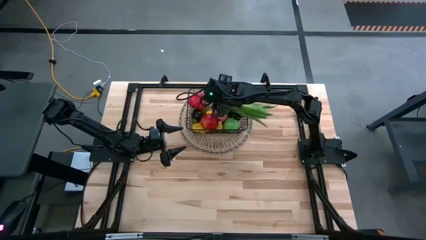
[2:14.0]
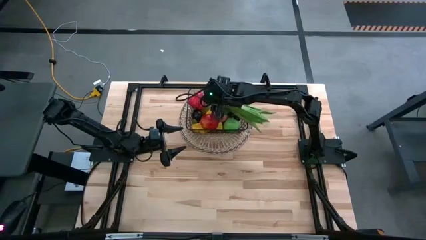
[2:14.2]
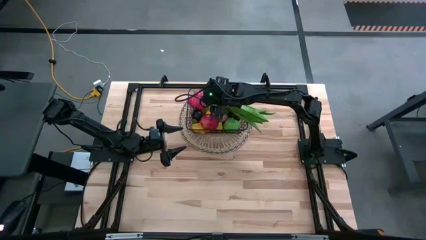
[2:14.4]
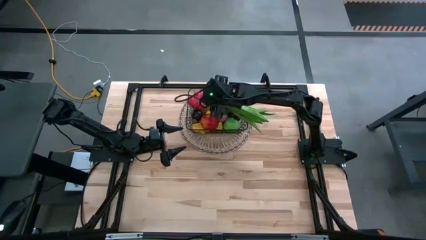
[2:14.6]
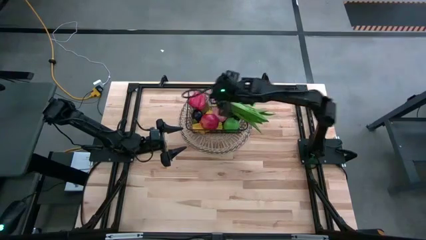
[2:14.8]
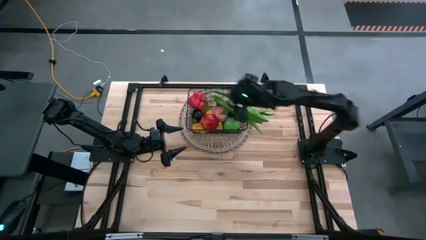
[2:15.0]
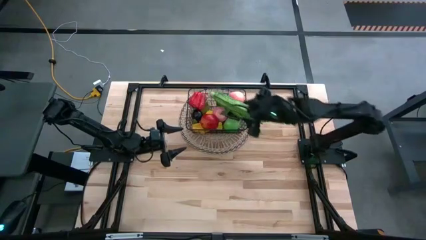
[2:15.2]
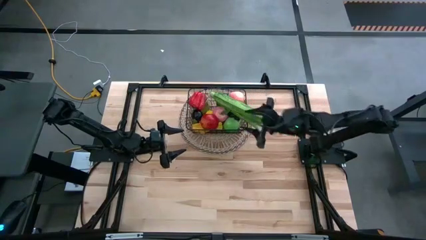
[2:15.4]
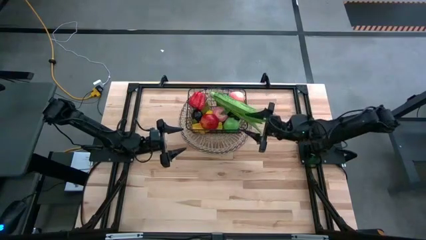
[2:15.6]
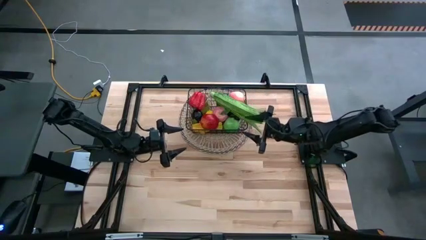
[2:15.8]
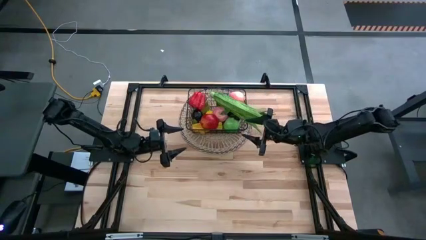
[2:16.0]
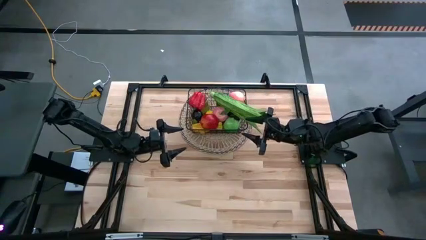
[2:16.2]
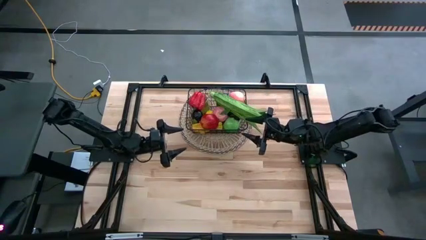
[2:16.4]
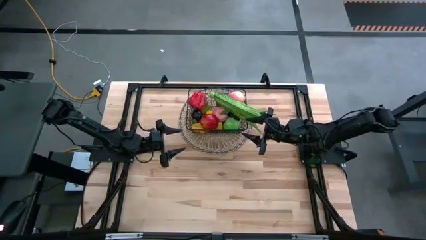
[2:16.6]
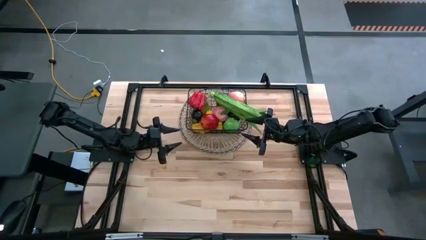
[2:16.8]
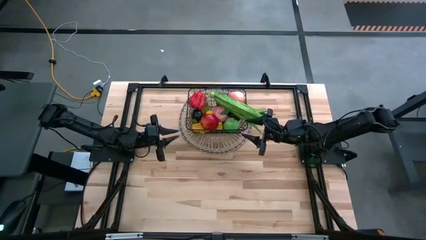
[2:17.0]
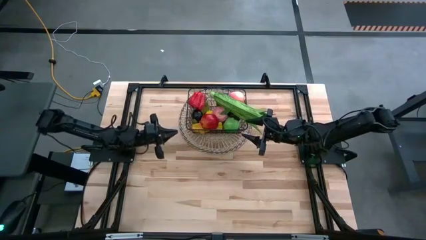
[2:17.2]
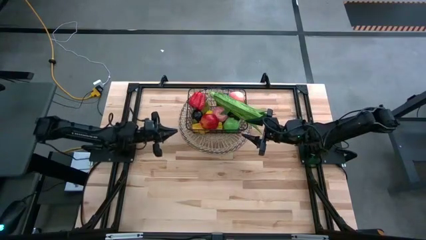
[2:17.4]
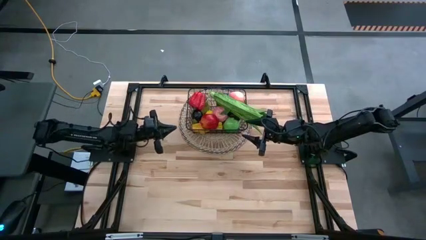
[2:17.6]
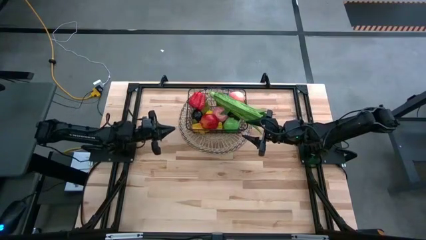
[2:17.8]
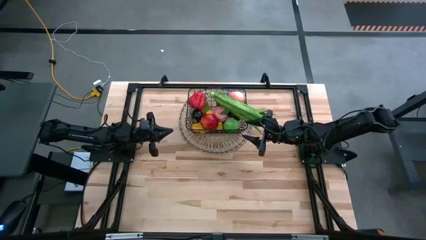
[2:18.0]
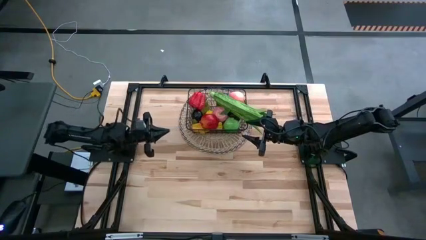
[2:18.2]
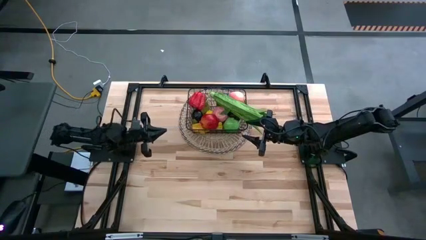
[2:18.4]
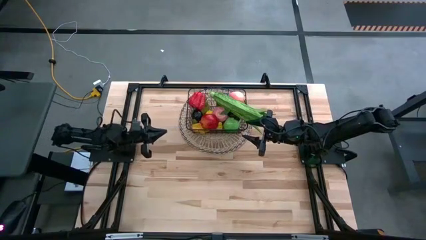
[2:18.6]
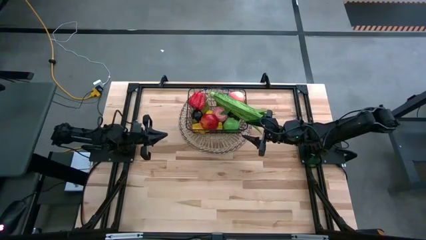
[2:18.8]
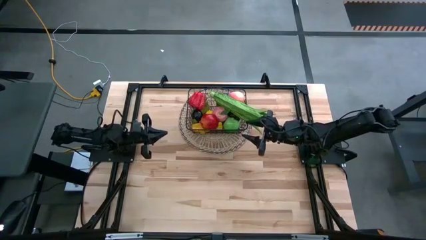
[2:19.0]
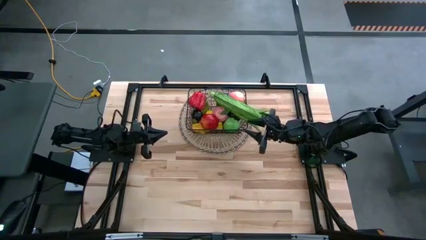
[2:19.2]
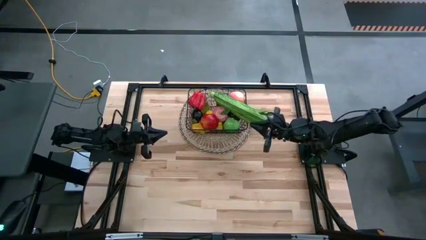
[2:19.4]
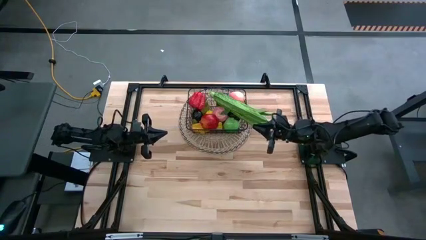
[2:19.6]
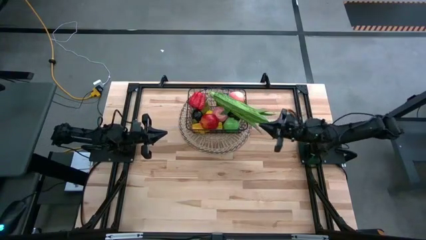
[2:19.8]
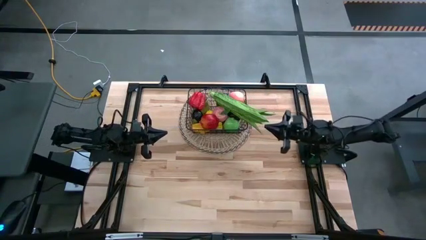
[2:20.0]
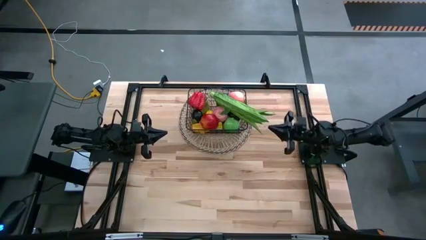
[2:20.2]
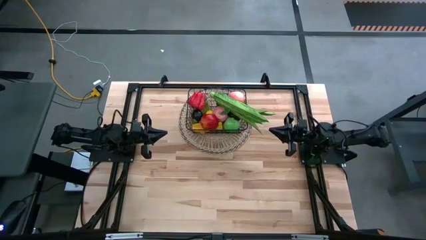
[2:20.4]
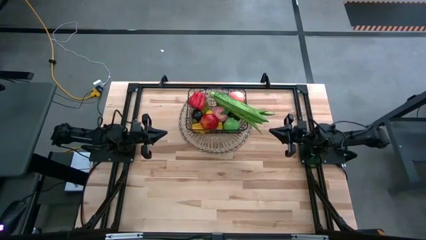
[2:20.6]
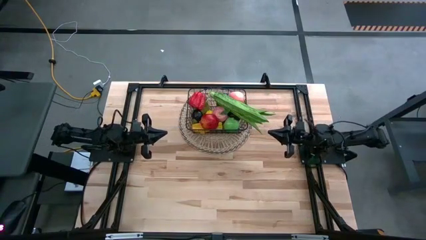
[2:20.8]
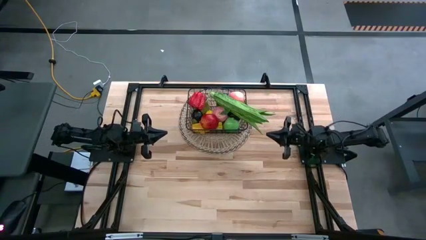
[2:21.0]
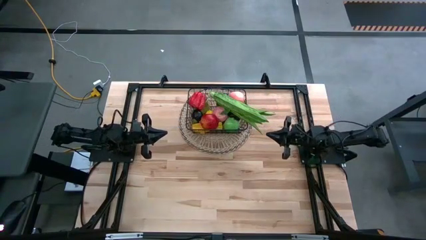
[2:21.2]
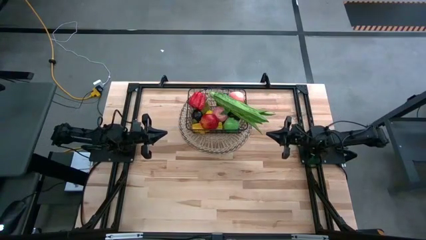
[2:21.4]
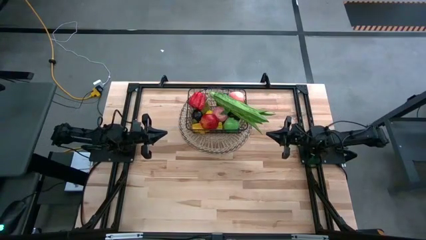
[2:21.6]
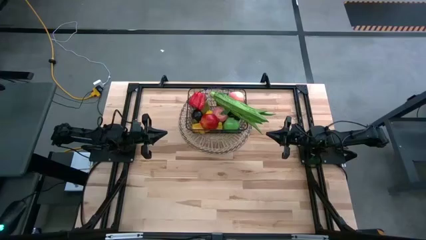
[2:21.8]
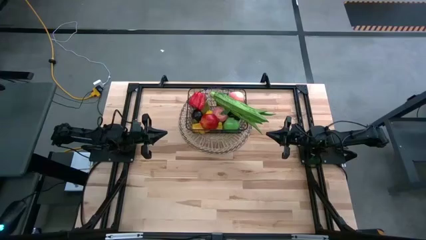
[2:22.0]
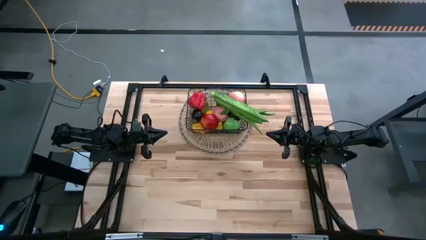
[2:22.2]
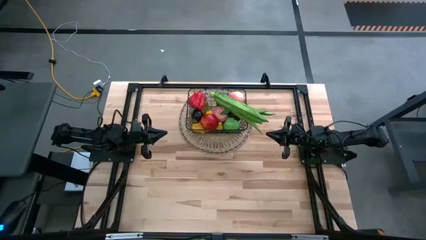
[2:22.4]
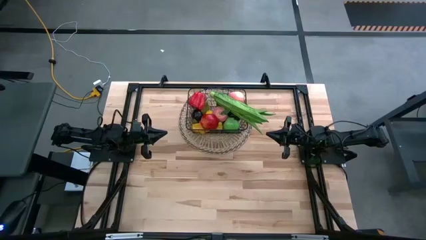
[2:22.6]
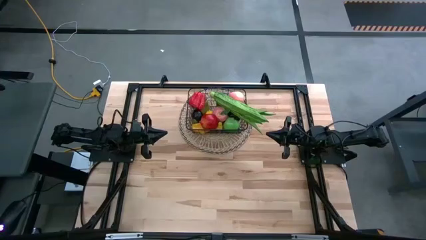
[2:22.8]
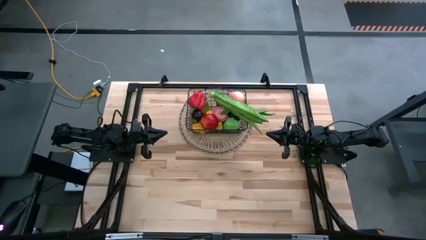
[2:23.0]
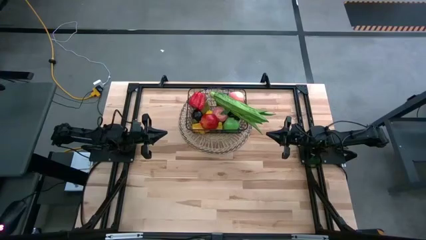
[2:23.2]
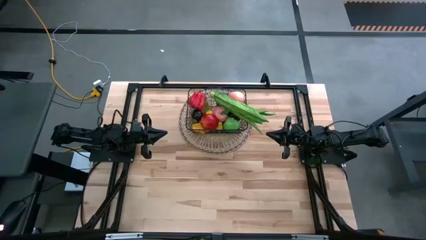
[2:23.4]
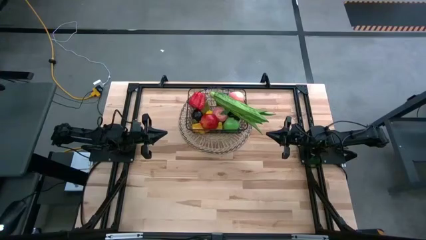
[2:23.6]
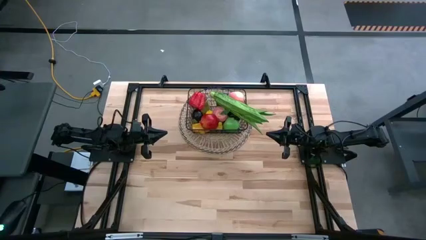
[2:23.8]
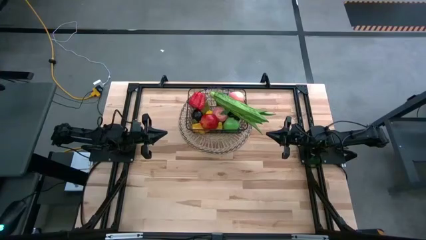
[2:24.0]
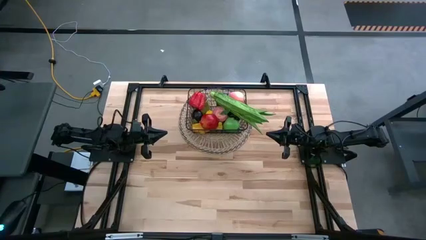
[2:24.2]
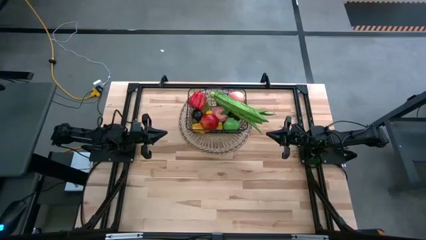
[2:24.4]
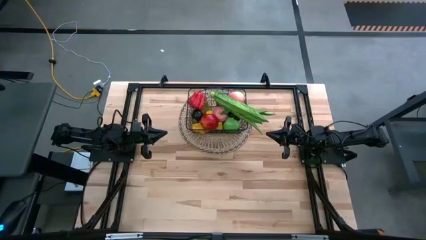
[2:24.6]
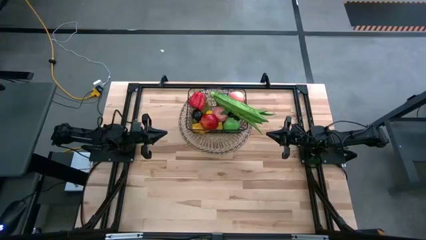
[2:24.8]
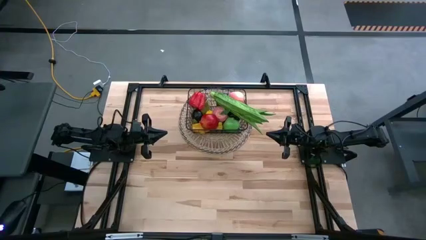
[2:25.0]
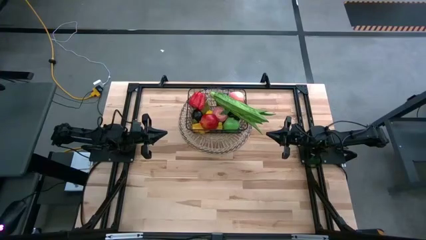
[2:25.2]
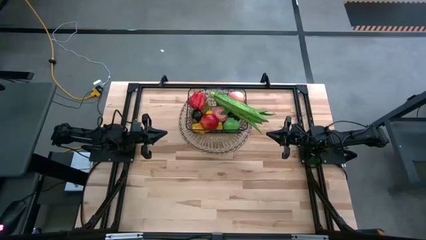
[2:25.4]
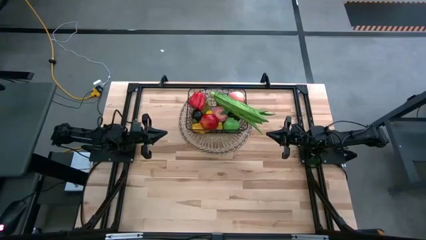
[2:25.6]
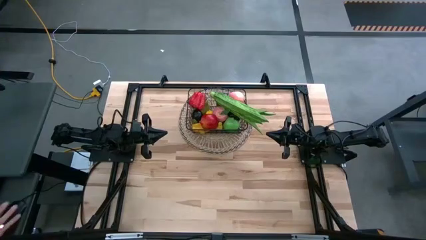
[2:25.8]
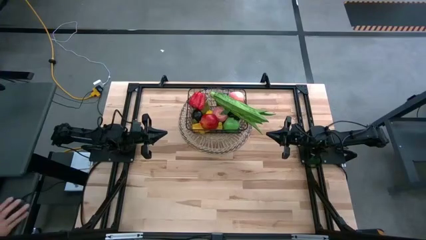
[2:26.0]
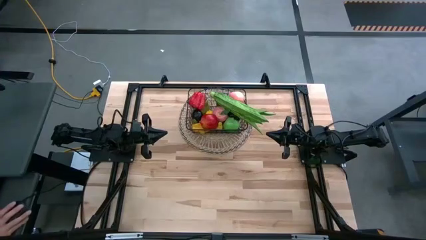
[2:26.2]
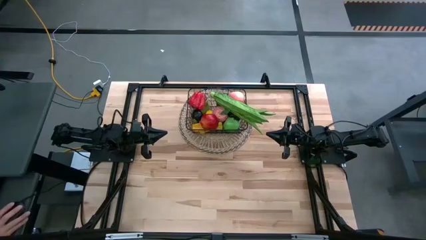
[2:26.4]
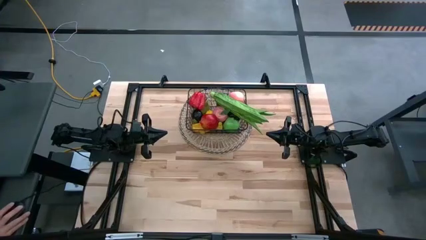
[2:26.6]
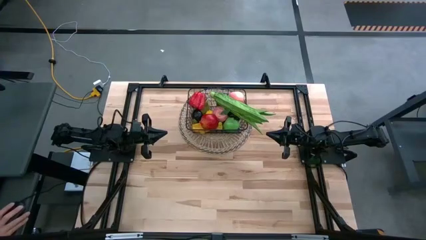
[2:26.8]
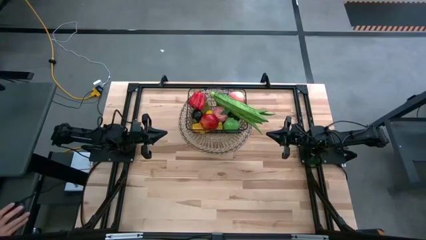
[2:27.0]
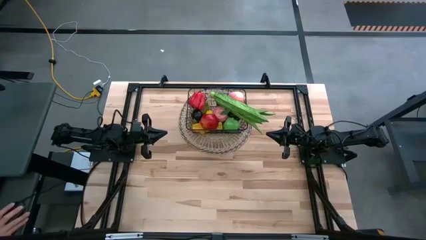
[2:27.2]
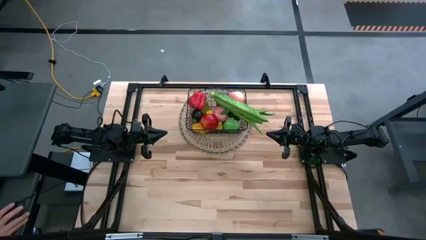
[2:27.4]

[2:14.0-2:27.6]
Task: Build produce basket
Return to Home Position
